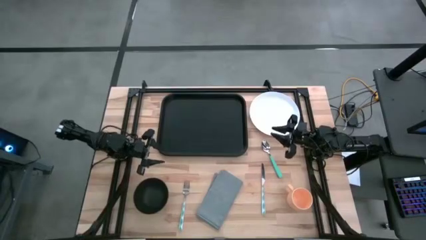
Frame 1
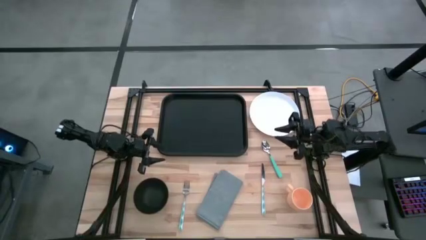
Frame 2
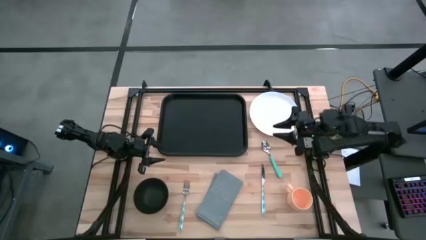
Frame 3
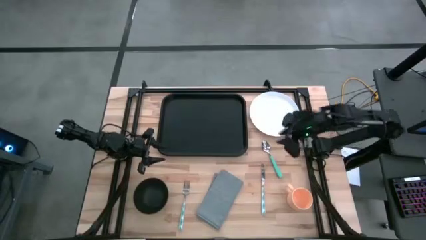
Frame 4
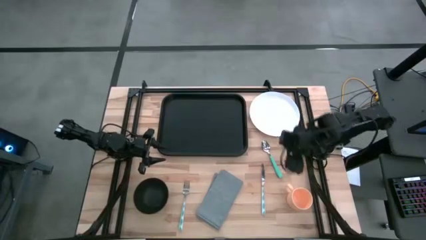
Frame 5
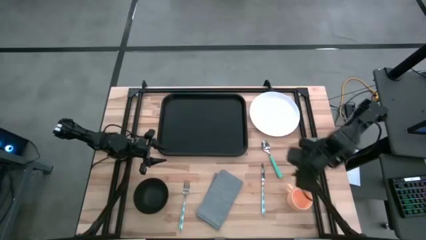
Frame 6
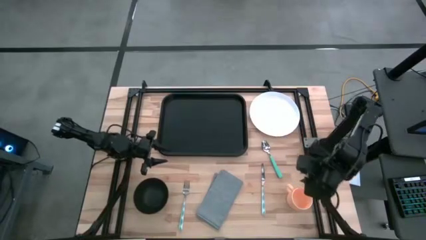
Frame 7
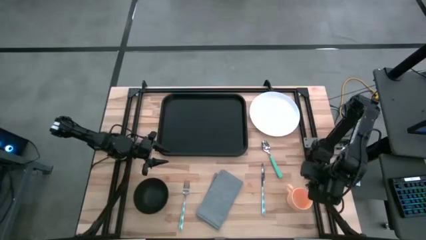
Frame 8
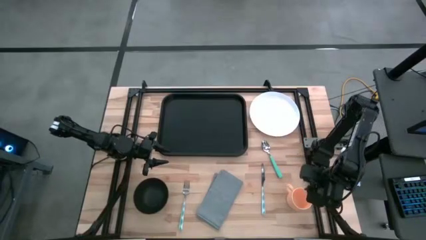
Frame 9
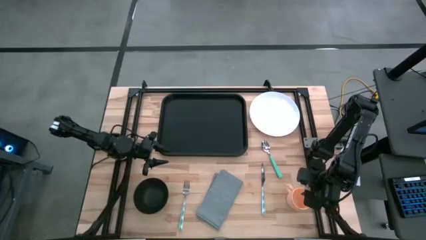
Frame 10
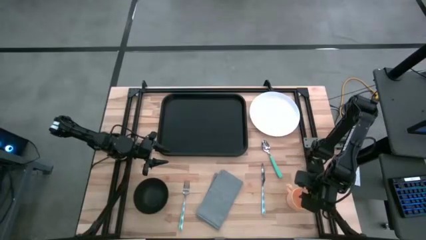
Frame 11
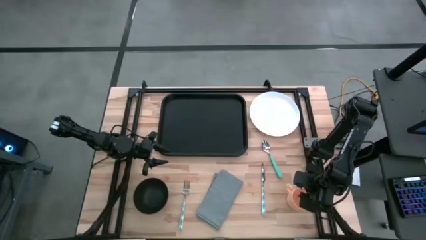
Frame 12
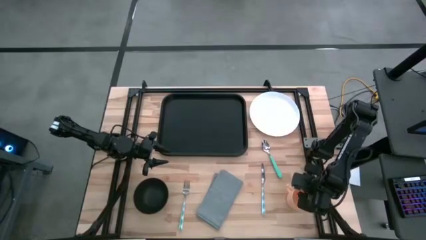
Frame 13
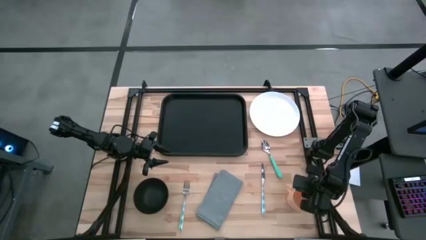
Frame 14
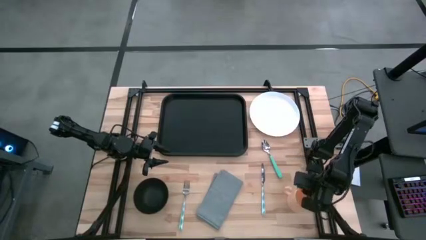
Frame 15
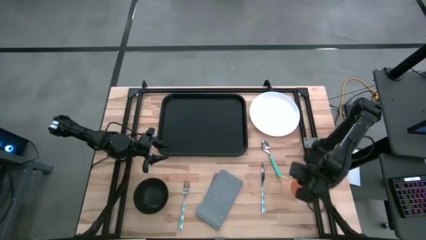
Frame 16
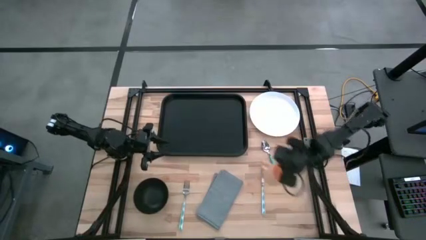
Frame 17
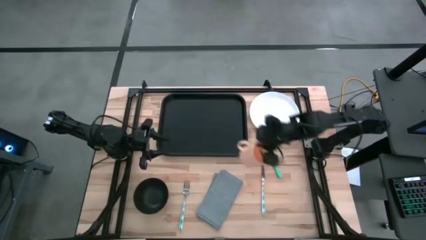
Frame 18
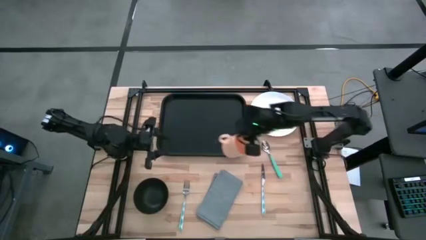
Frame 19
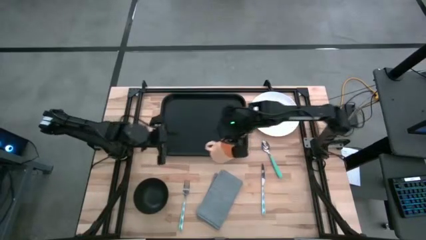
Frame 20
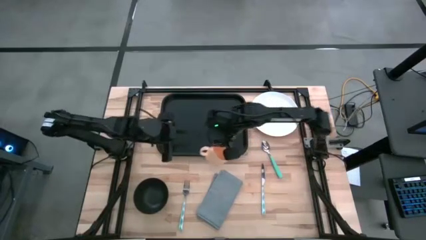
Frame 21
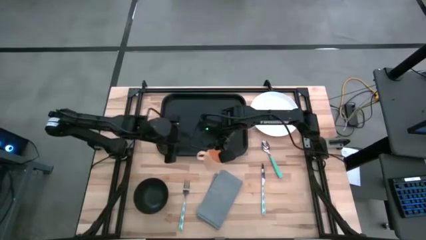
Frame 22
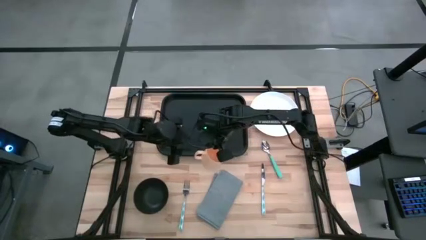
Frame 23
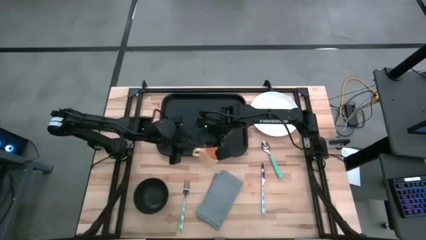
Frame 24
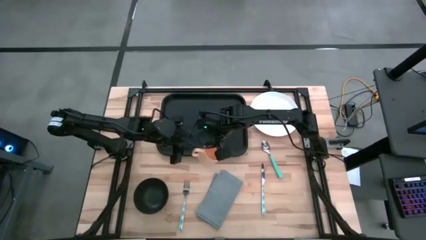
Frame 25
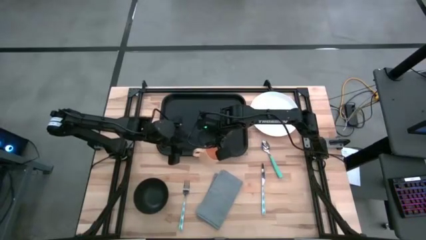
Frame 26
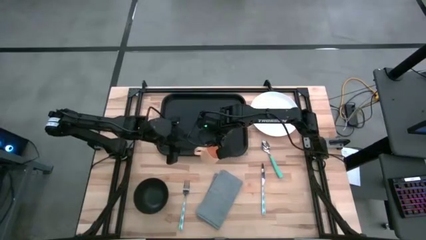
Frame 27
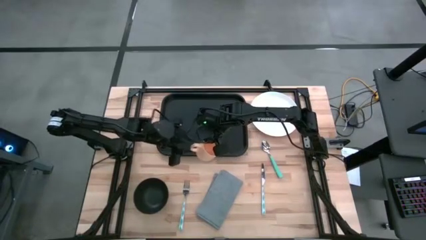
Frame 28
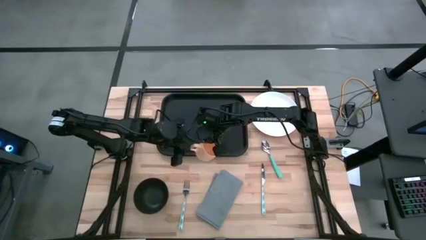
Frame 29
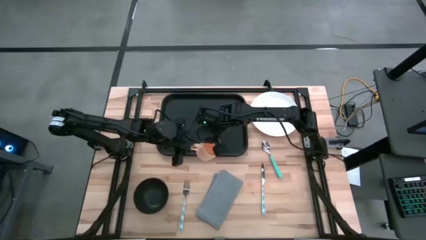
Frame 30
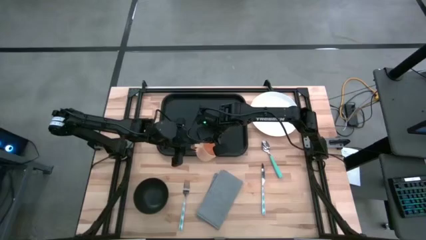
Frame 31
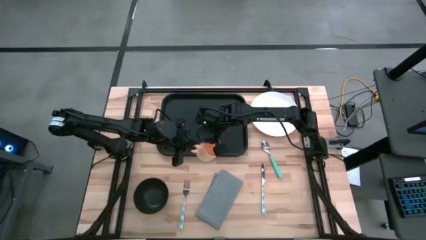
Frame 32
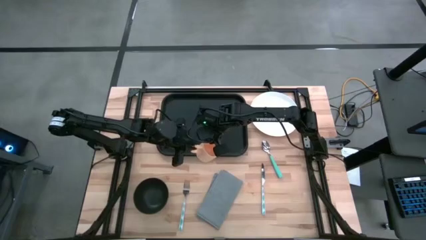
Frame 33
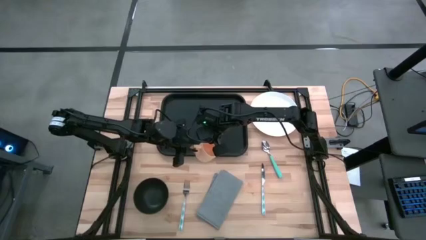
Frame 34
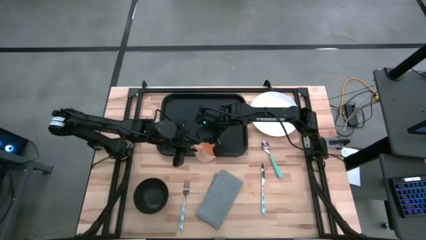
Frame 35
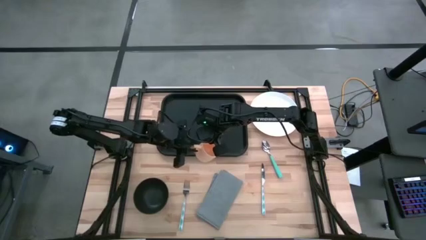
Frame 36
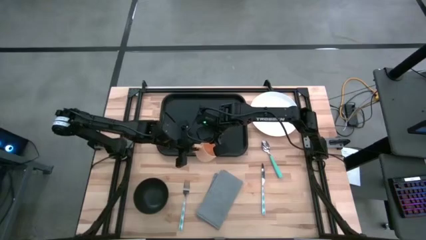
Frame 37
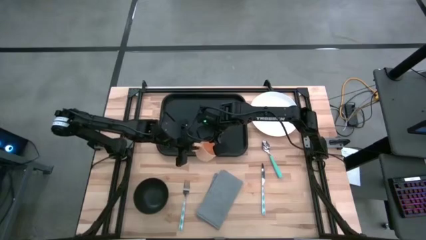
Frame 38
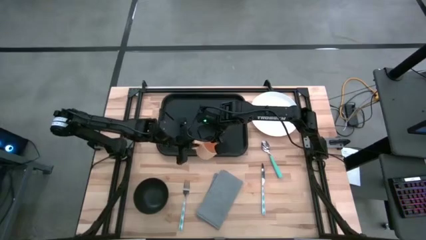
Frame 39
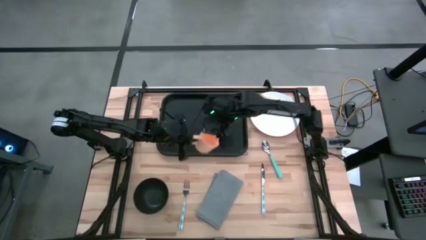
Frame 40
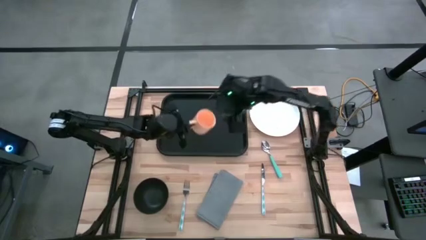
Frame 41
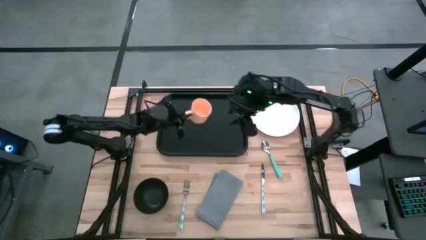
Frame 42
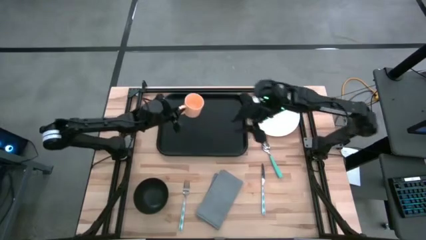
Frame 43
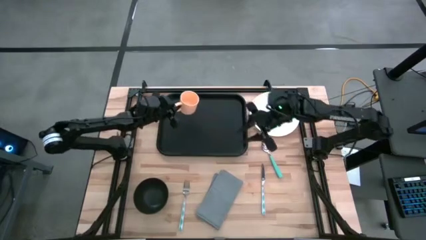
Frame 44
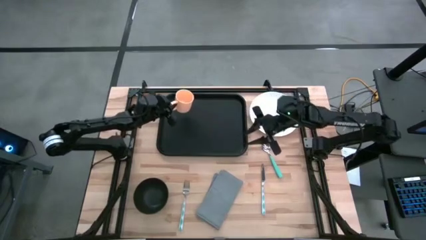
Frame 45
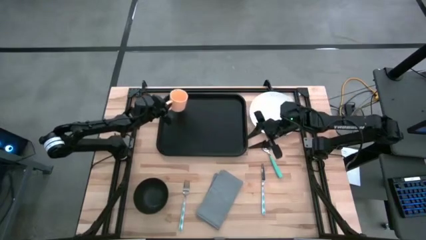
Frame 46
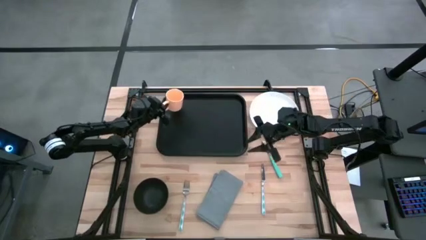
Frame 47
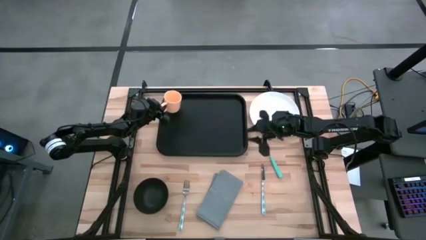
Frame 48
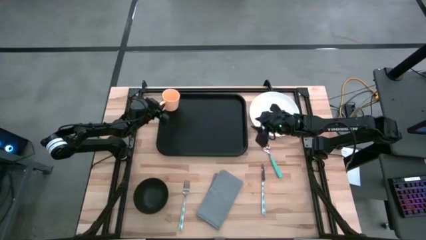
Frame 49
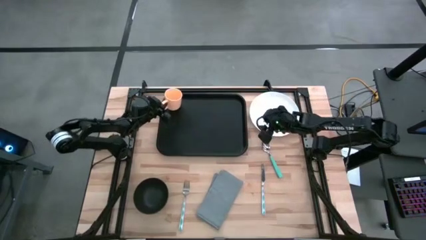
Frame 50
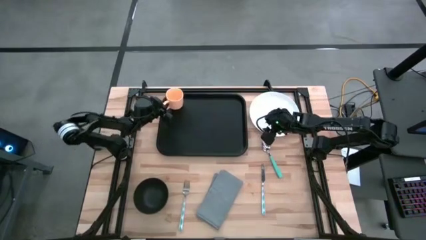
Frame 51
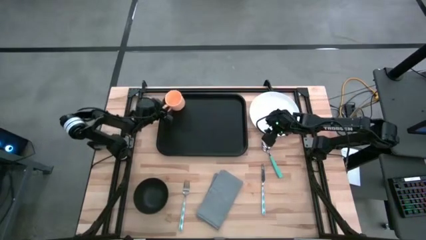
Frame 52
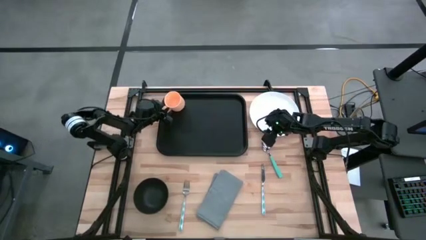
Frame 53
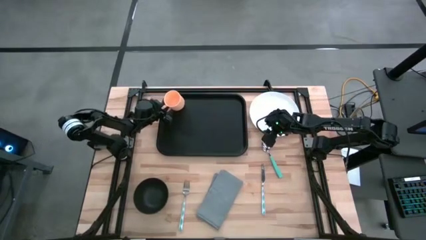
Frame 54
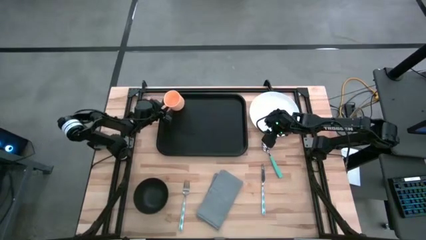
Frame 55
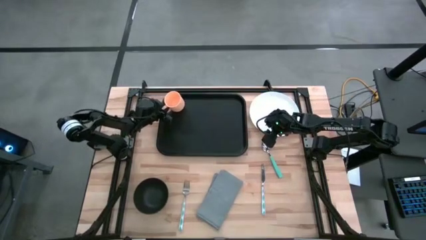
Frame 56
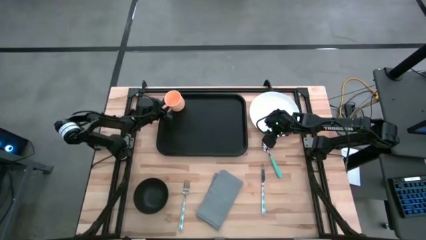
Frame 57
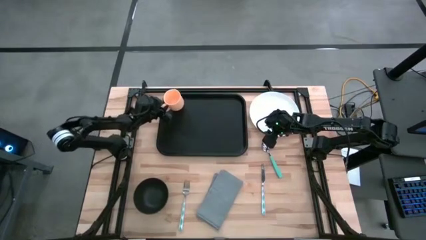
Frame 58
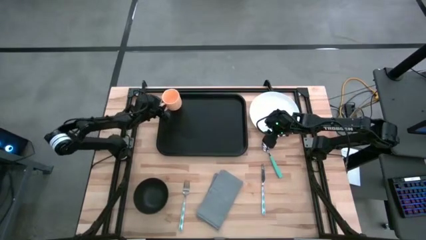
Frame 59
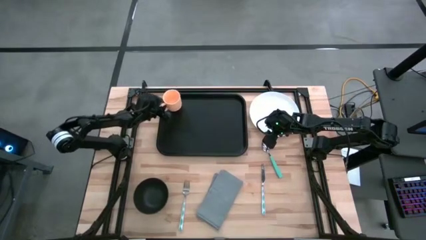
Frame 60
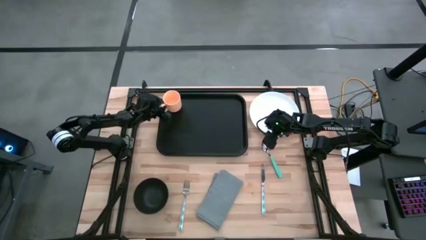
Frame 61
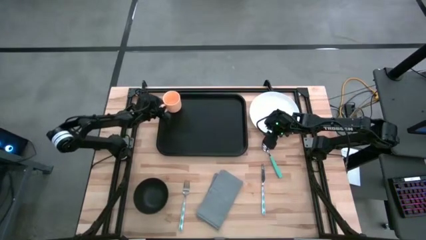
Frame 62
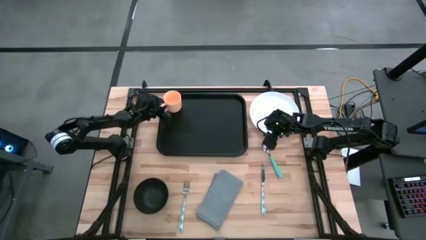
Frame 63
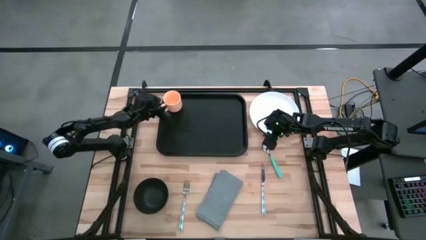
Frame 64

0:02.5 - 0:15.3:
Task: Set up tray
Put the mug on the top left of the serving tray

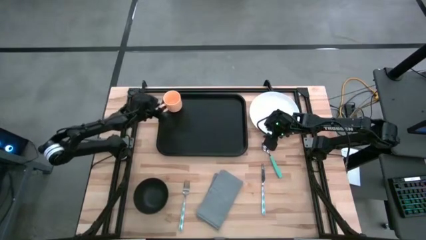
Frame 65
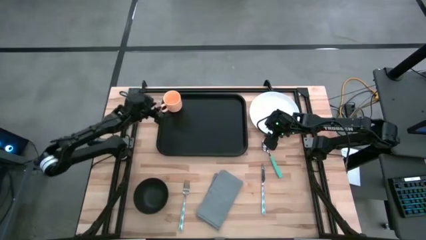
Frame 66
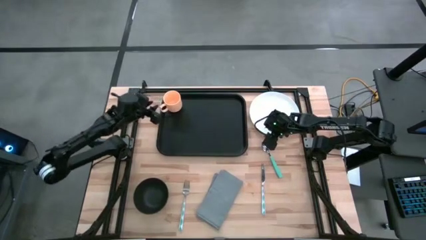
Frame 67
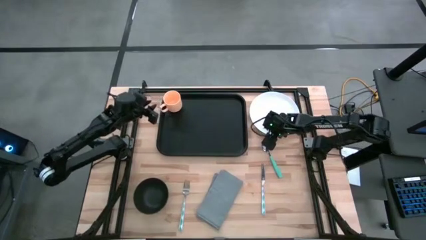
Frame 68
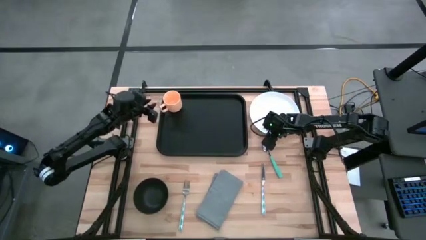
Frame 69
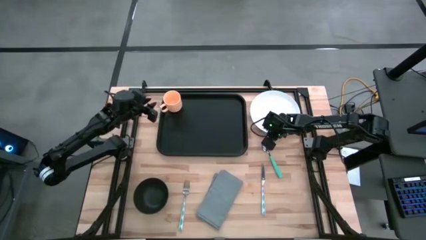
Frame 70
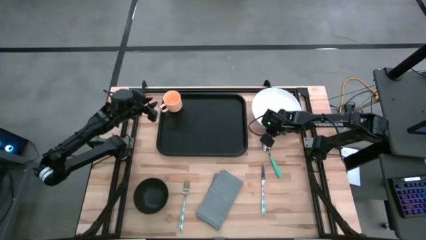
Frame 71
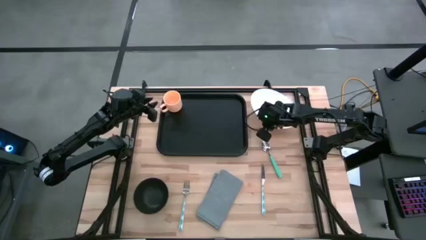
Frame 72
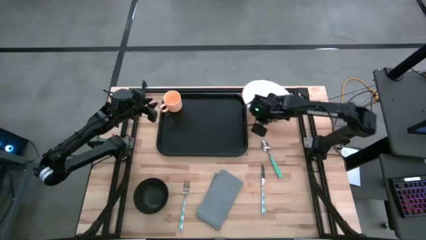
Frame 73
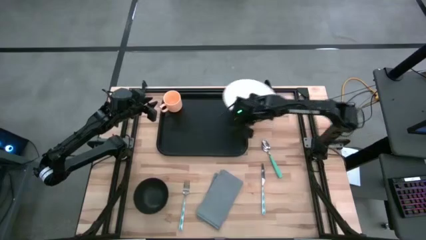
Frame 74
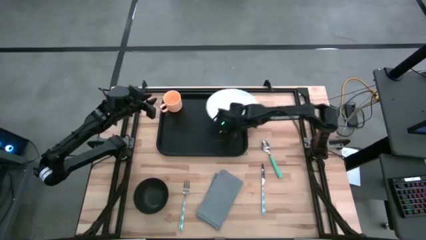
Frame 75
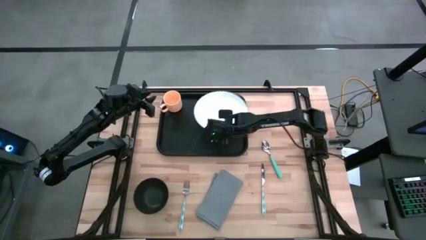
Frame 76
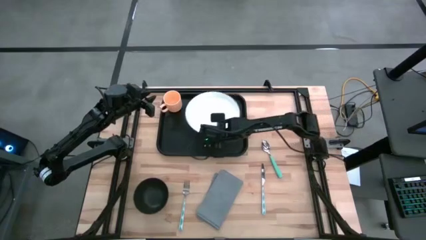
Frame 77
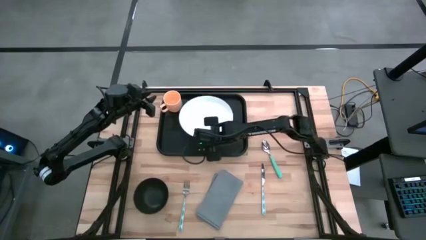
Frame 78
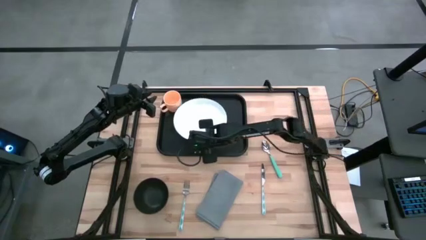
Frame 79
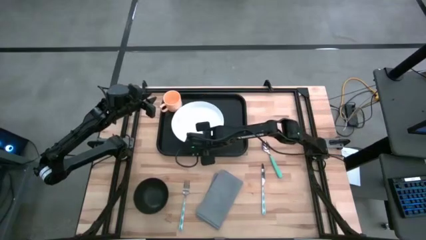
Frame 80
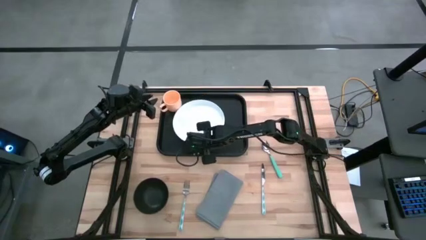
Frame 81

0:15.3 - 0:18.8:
Put the plate on the center of the serving tray
